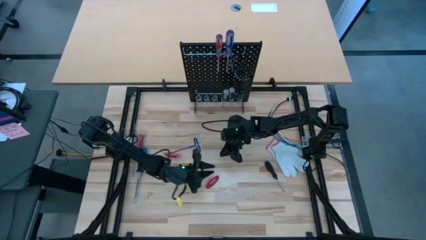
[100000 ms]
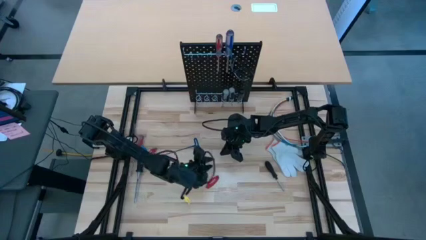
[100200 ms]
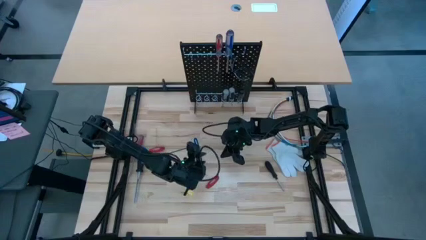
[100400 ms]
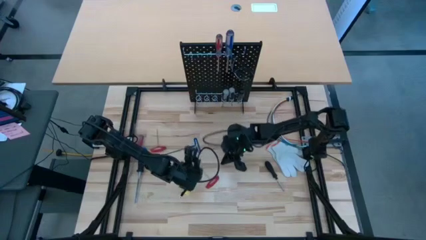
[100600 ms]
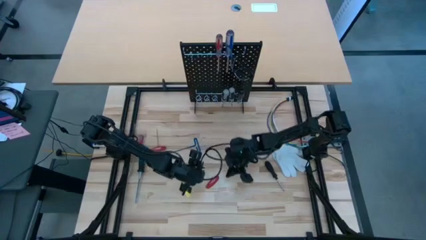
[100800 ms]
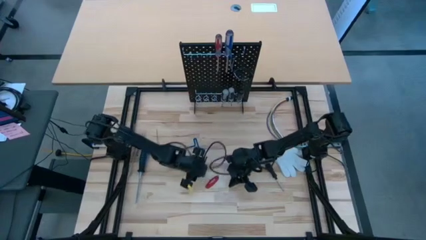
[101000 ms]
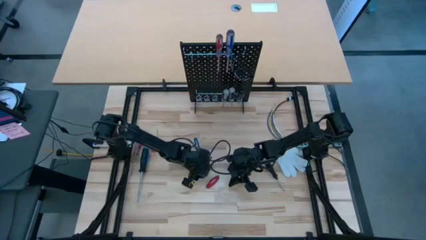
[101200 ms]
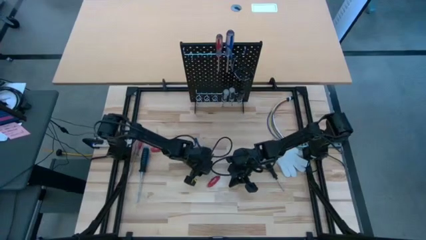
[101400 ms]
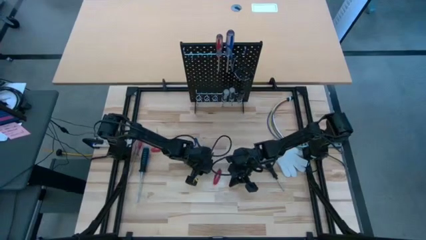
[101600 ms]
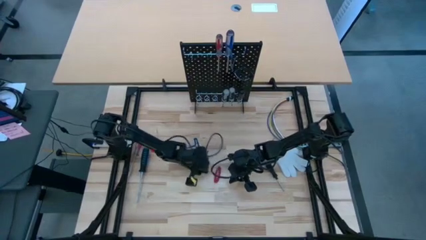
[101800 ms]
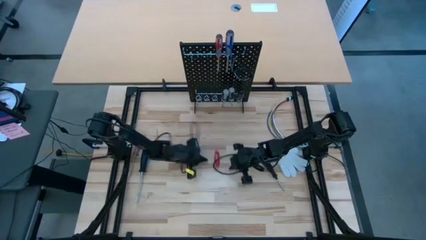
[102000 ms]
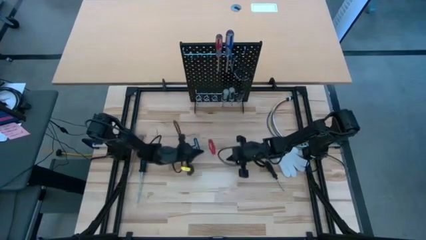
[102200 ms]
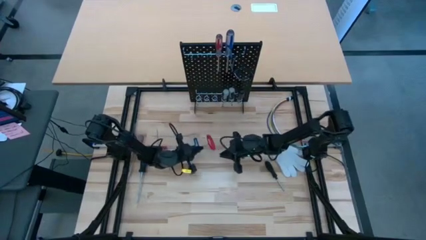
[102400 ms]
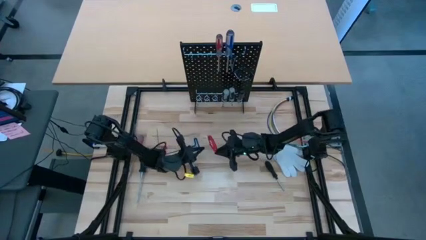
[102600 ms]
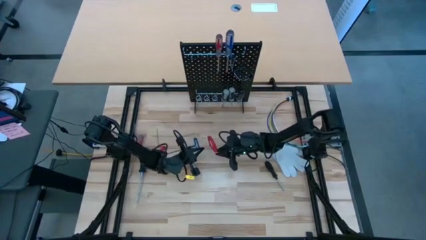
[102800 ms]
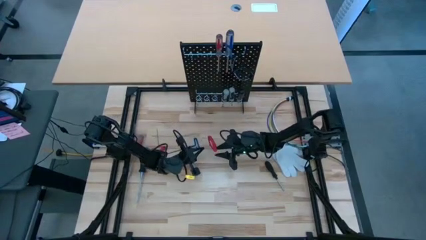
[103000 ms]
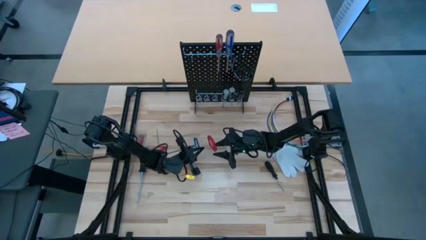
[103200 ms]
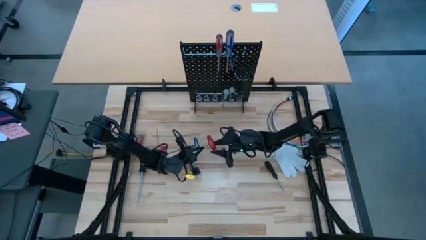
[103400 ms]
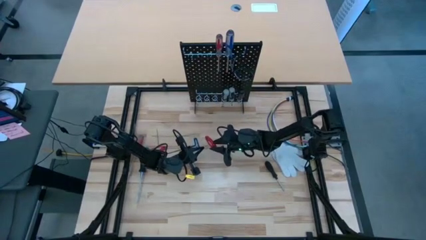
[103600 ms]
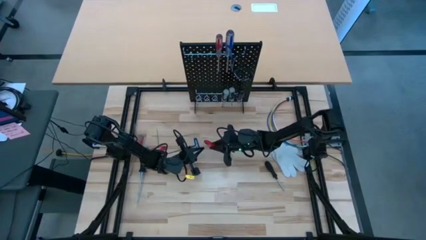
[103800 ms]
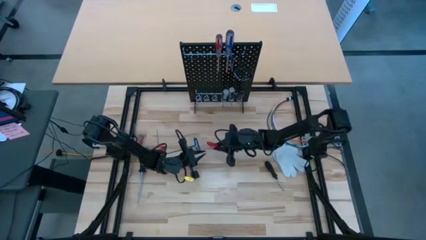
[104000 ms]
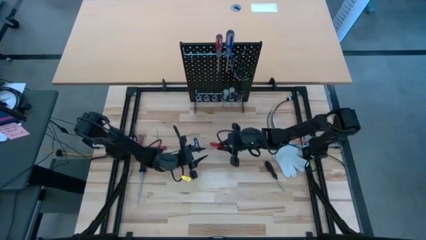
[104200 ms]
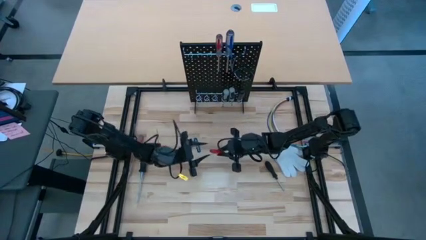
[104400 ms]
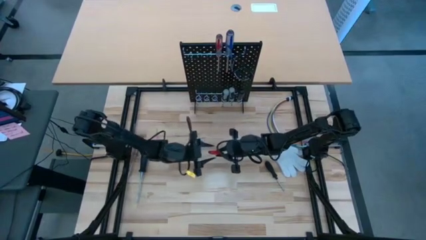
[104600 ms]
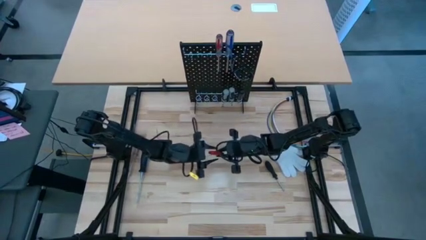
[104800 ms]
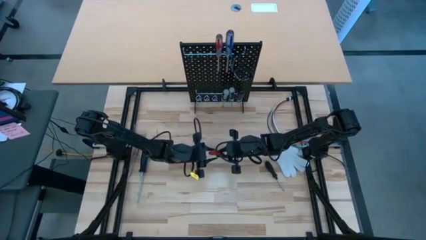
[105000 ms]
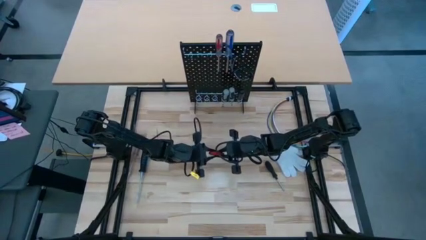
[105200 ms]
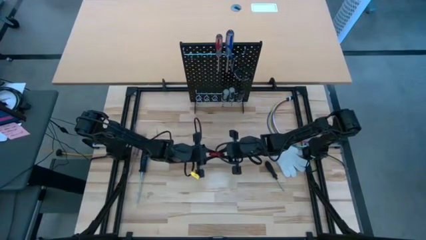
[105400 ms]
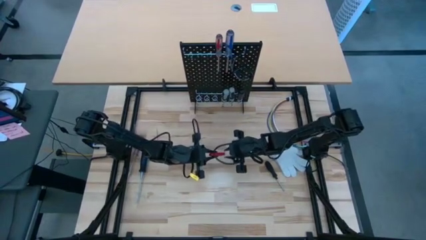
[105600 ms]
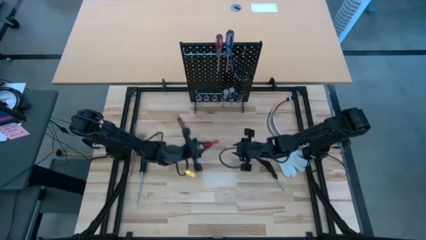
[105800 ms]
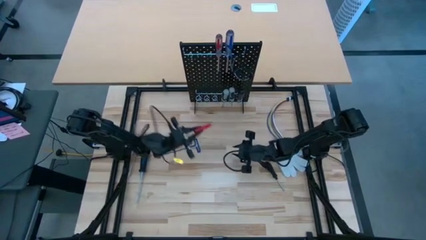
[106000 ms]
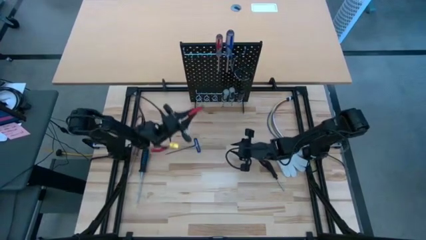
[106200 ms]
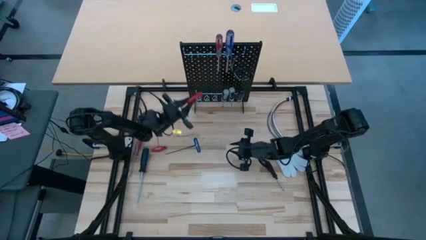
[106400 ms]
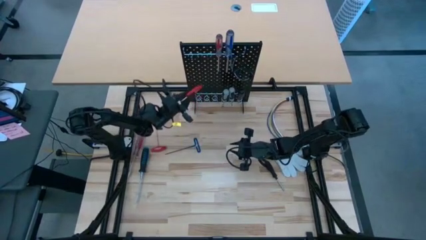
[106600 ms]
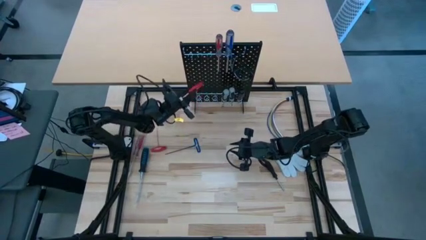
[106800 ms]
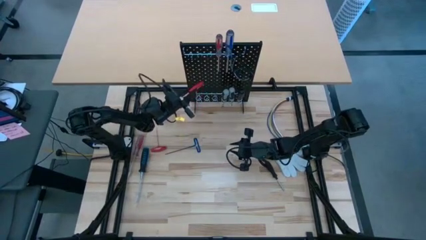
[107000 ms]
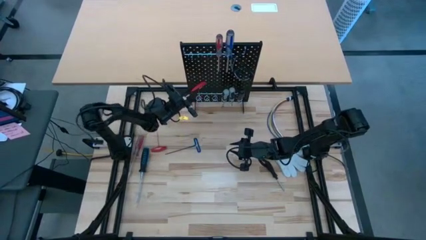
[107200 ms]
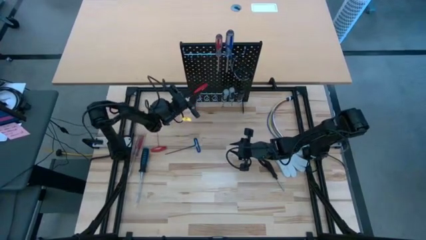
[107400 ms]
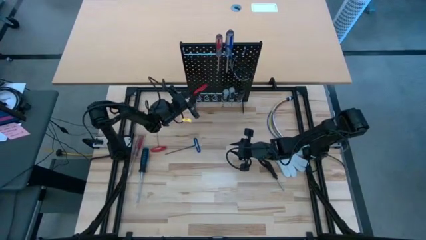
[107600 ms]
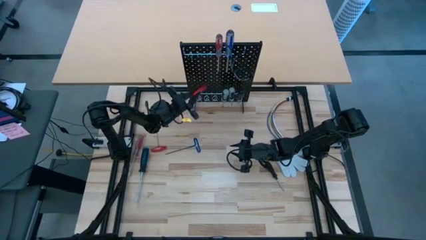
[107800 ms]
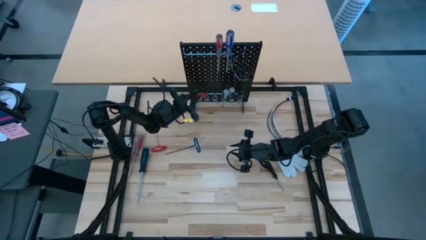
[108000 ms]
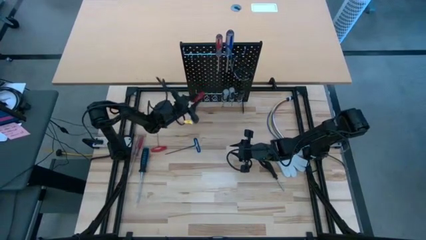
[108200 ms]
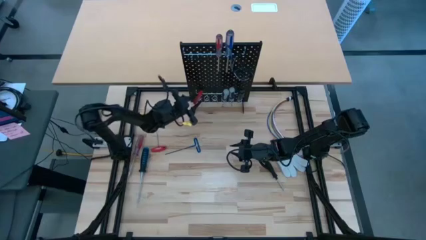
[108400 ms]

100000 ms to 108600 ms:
Task: Hang tools onto peg board
Hang the bottom red allen wrench on the pegboard

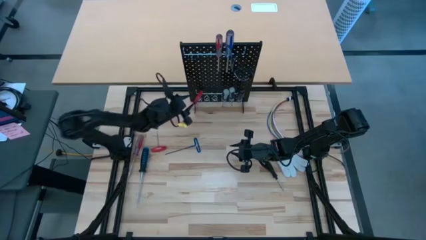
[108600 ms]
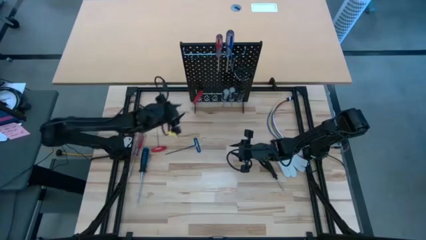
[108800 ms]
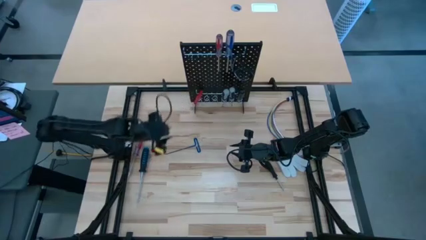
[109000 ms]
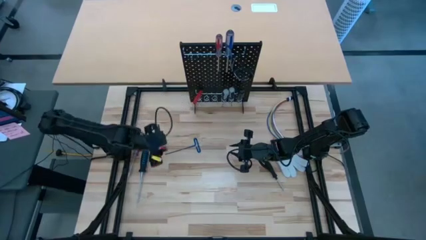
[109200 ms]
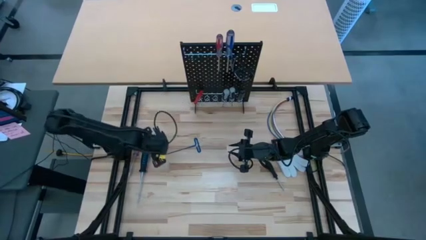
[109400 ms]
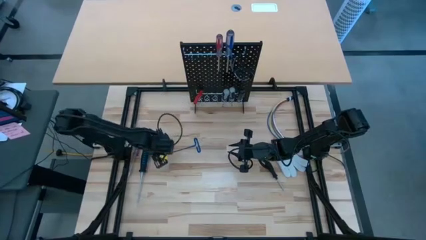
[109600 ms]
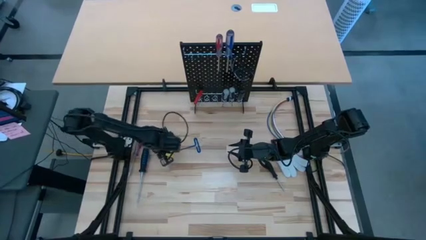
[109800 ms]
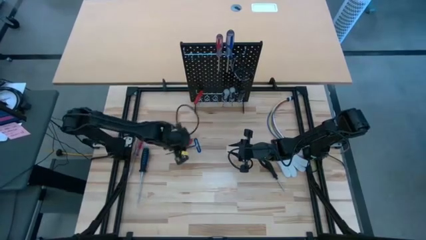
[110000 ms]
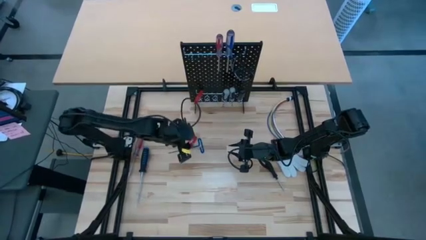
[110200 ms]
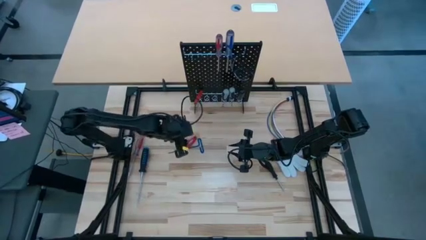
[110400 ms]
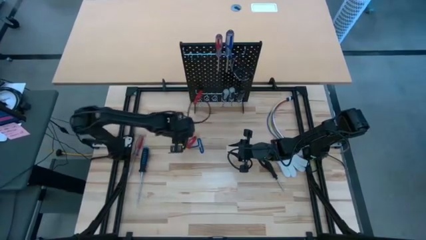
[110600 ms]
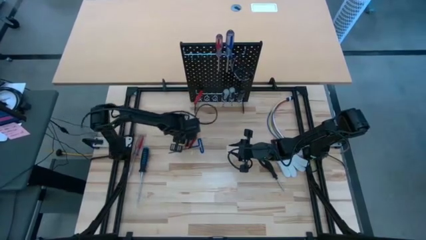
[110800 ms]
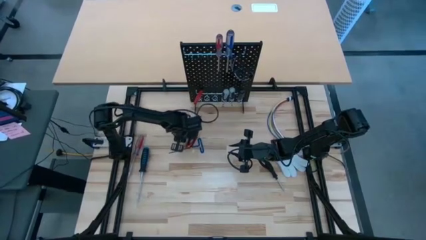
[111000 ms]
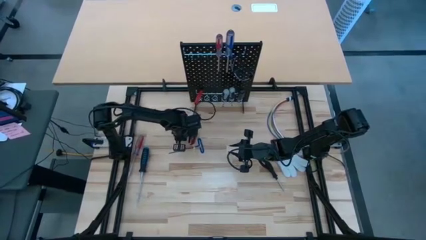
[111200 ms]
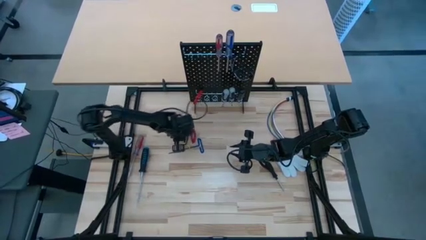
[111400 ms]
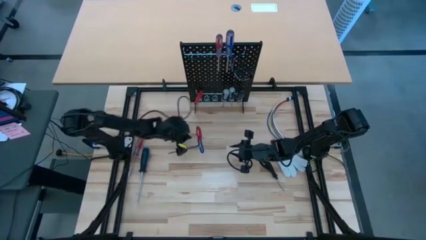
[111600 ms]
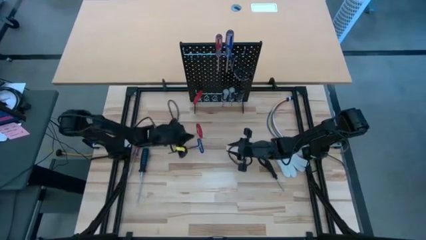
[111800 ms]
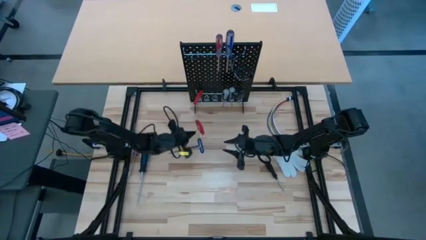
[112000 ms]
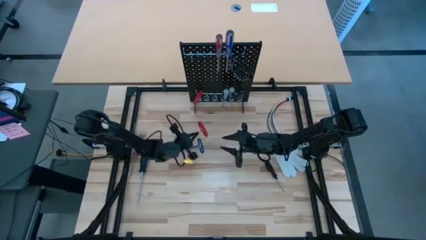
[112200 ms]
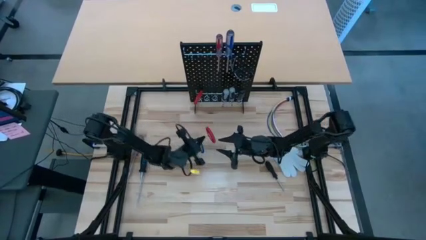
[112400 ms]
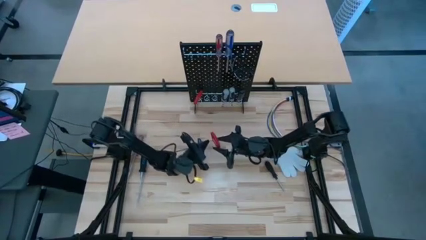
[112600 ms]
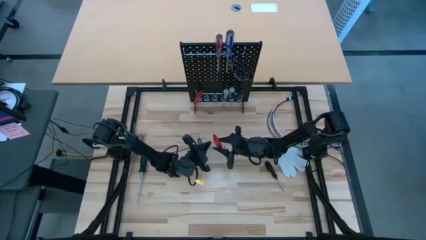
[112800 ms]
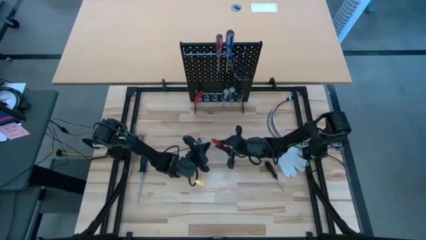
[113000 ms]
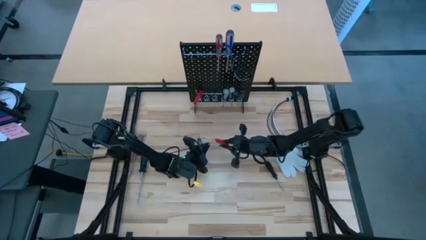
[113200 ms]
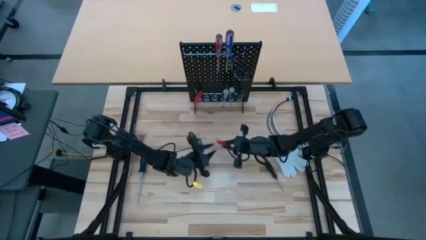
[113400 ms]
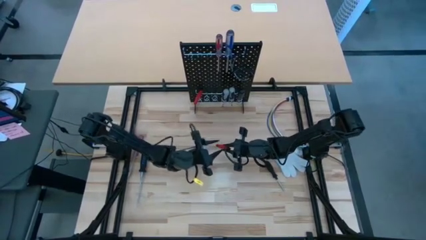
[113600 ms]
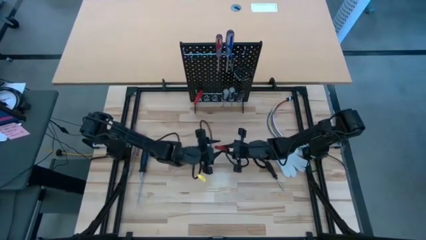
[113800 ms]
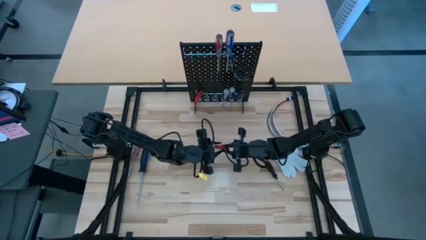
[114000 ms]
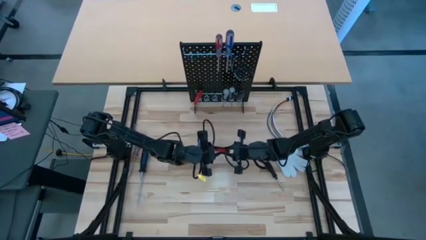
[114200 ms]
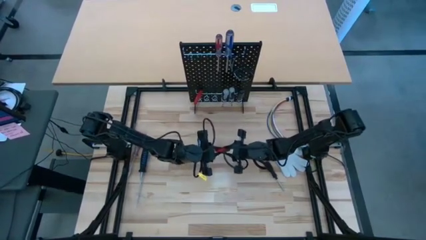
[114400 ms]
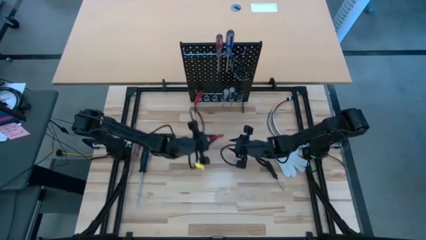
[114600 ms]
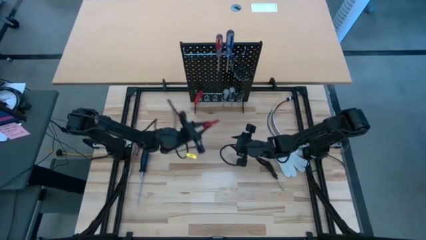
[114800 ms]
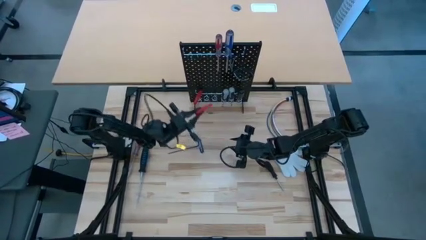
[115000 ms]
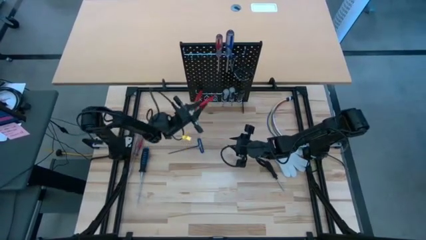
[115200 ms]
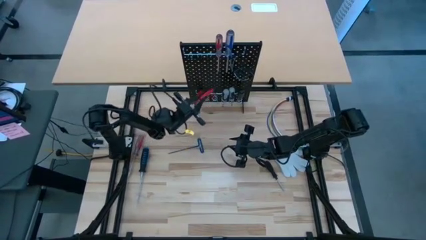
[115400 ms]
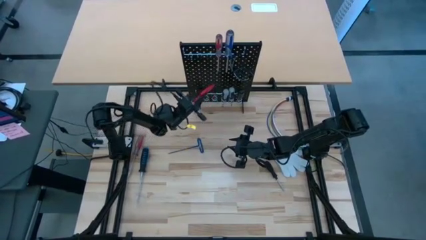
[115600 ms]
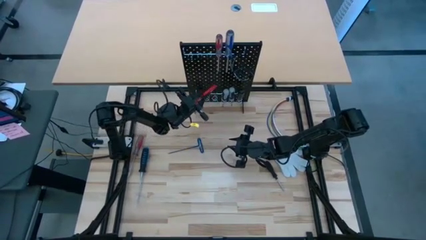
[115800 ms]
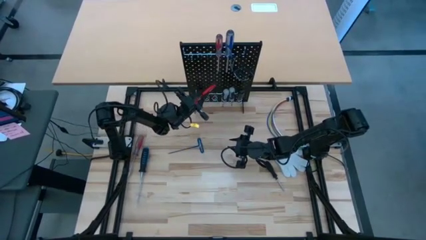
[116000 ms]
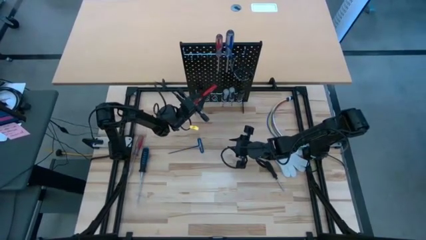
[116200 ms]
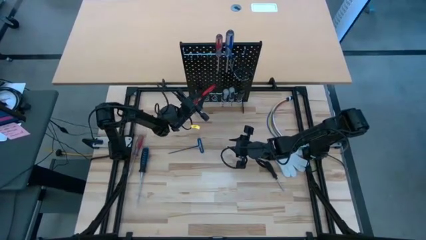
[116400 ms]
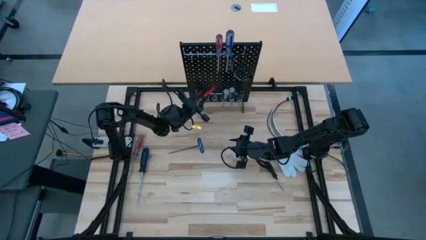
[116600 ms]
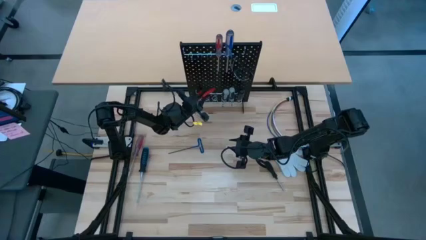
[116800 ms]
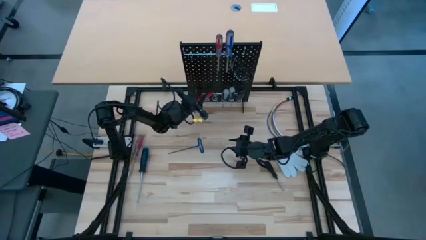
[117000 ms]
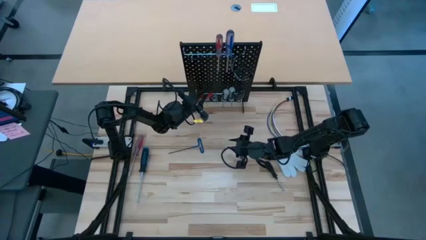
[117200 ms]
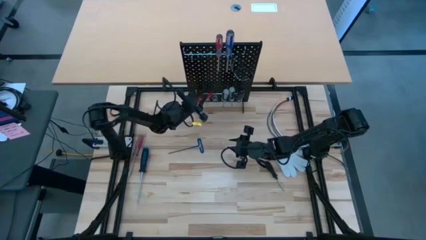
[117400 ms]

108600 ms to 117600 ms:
Hang the red allen wrench on the pegboard
